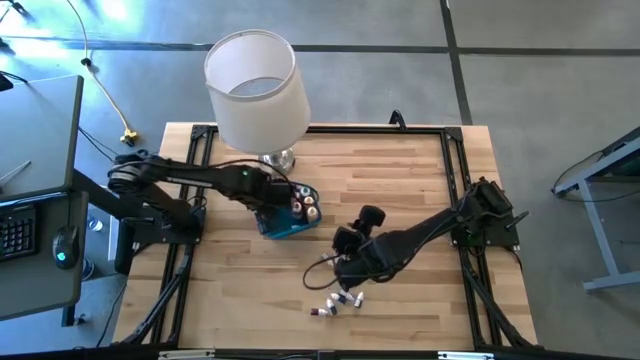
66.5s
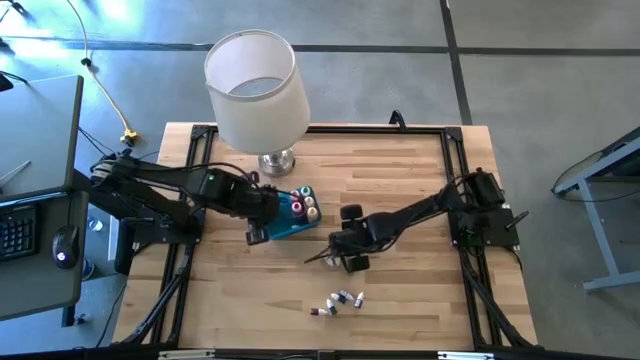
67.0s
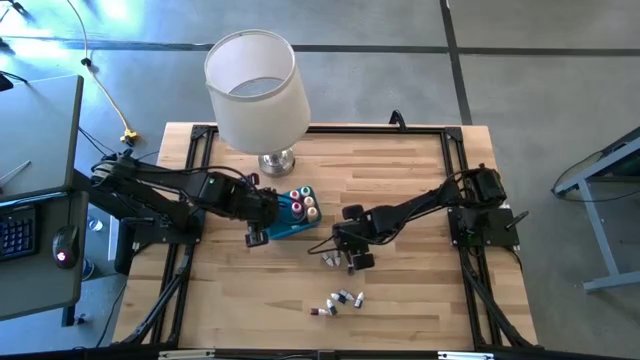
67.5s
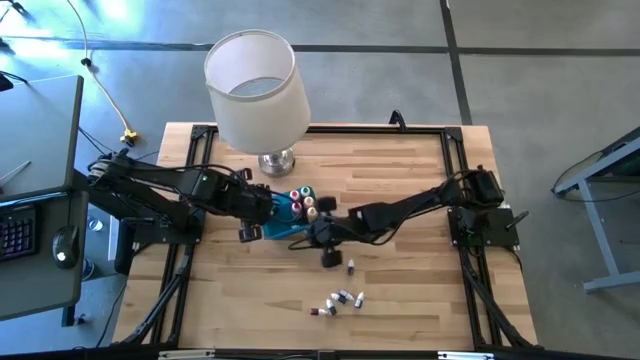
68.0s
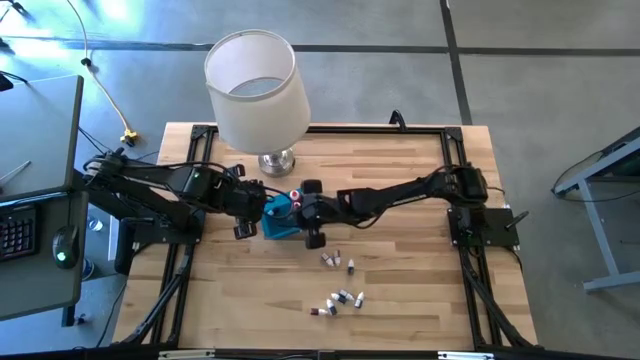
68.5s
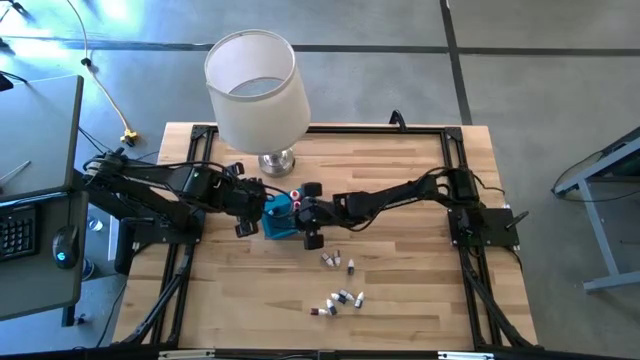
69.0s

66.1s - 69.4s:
Task: Pick & Place food coloring
Put the small green food coloring bottle into the blue bin

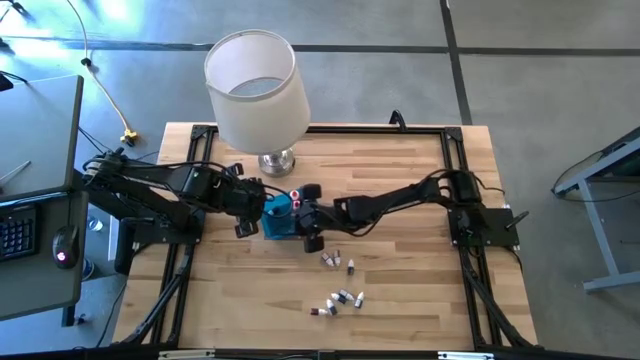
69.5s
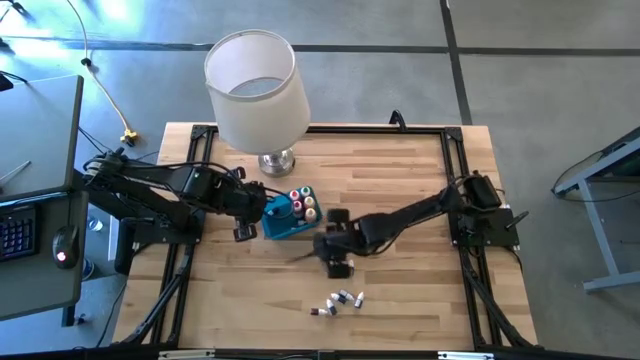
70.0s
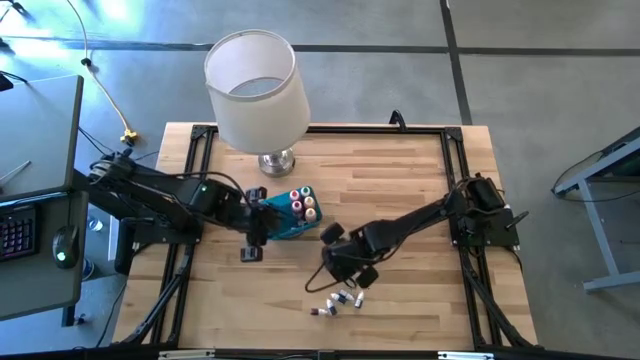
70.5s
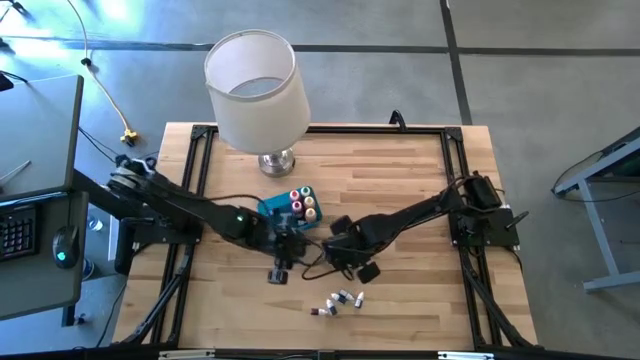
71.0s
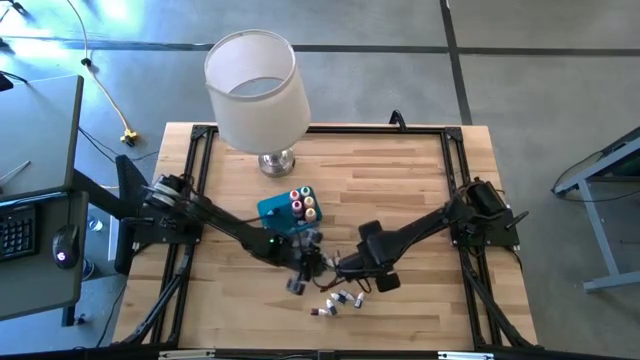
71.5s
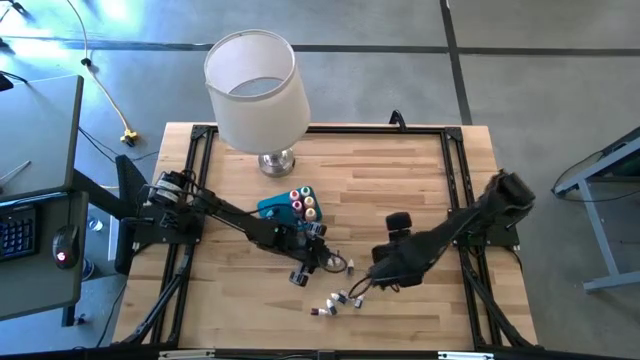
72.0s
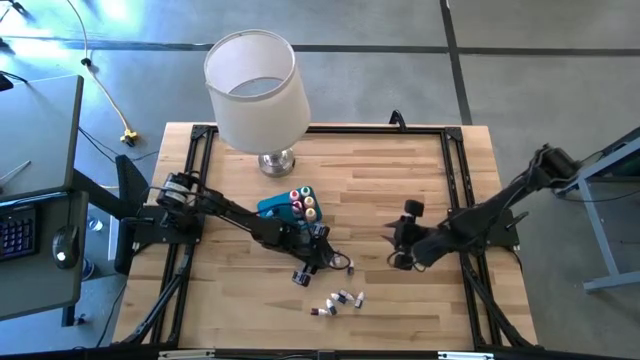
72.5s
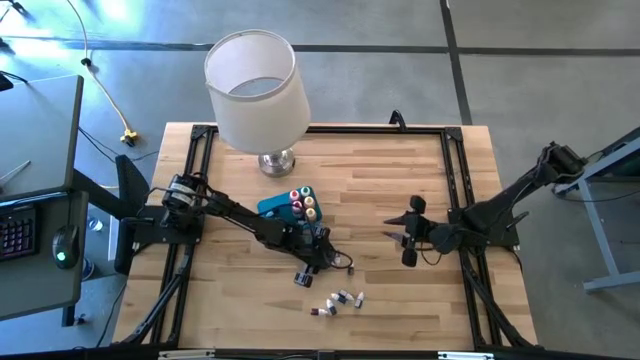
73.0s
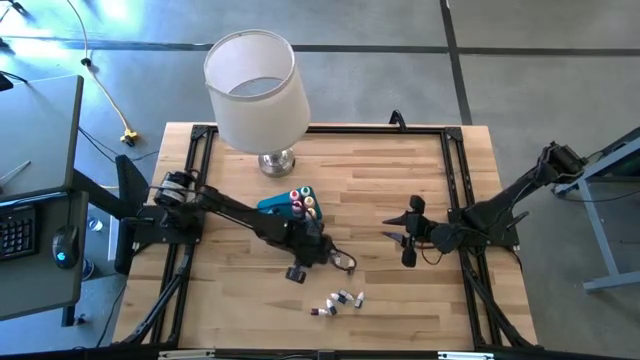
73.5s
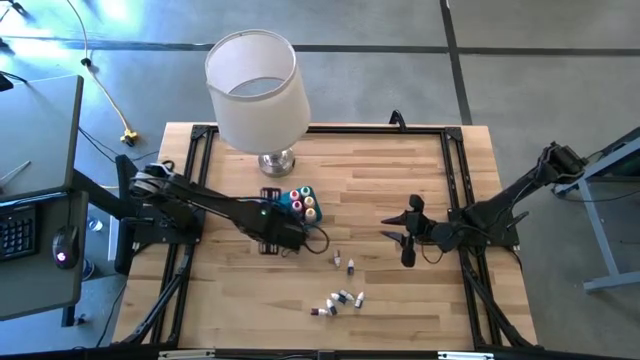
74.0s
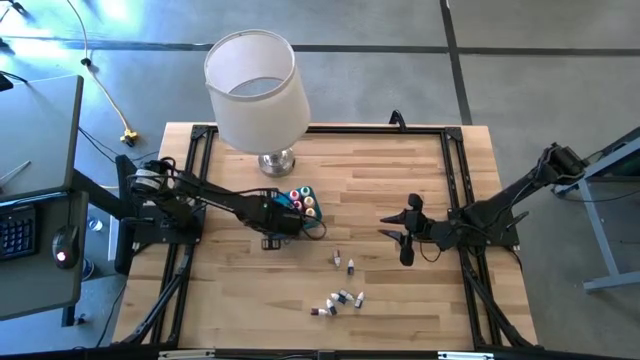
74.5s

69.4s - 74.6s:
Put the left small red food coloring bottle into the blue bin

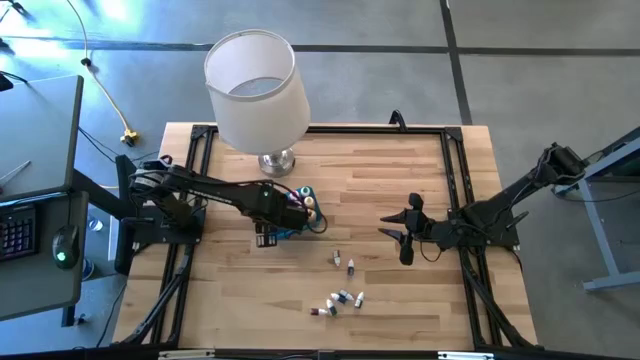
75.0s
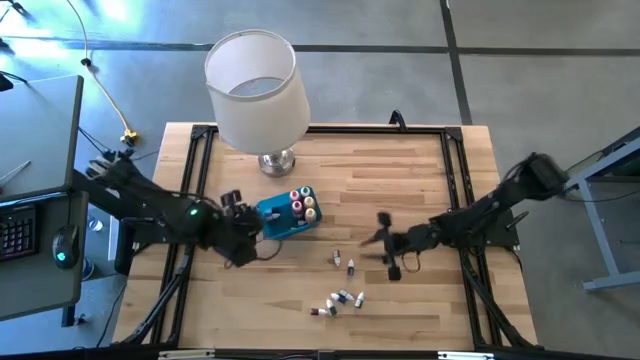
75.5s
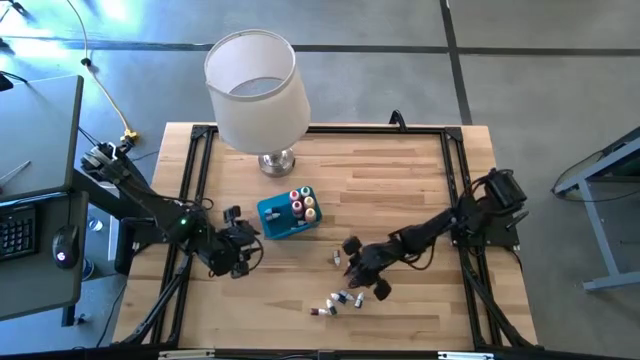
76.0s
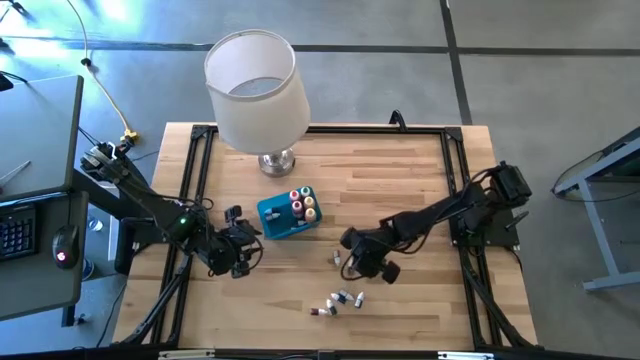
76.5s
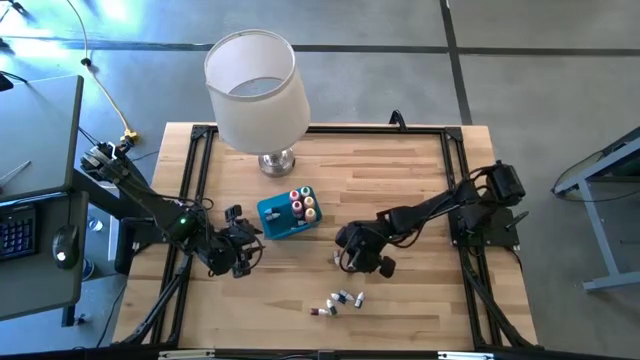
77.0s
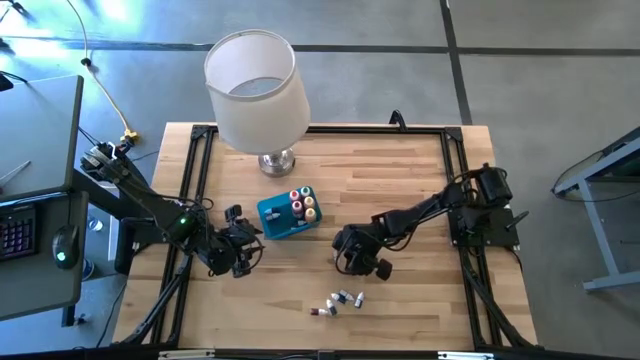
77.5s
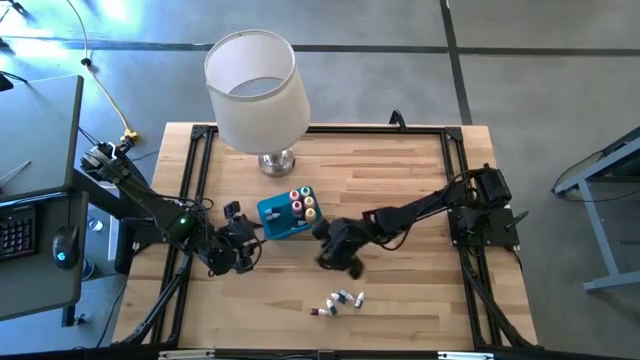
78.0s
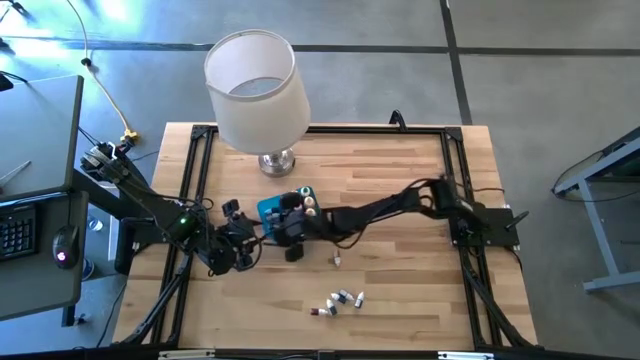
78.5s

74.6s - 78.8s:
Put the small blue food coloring bottle into the blue bin

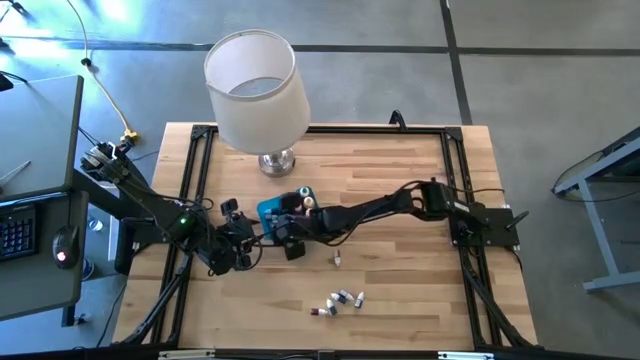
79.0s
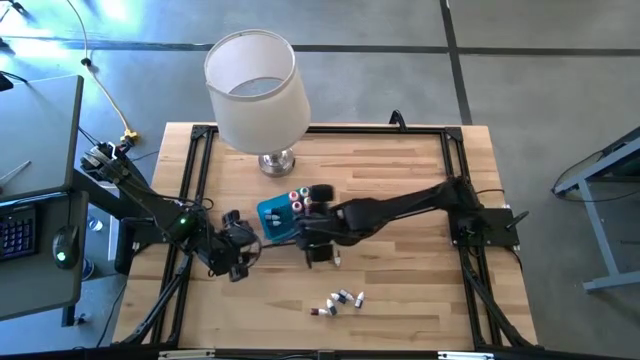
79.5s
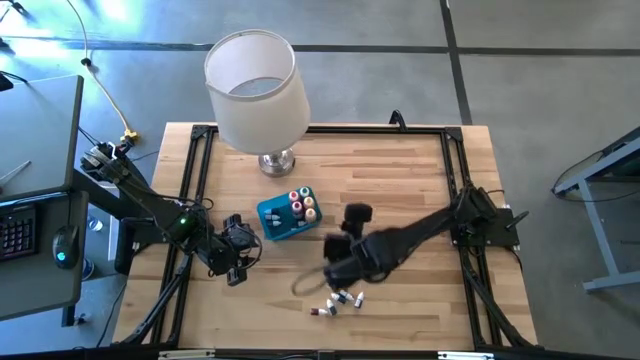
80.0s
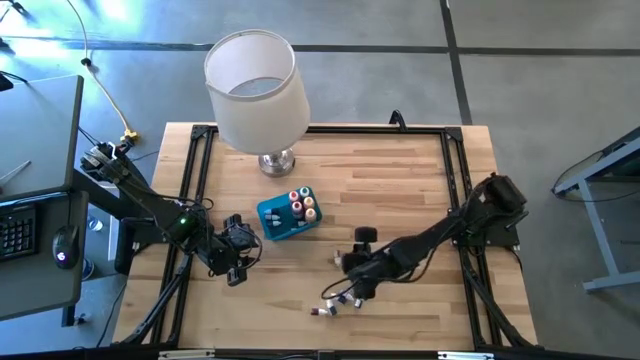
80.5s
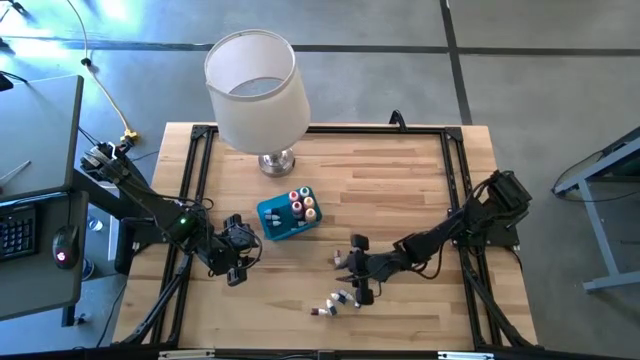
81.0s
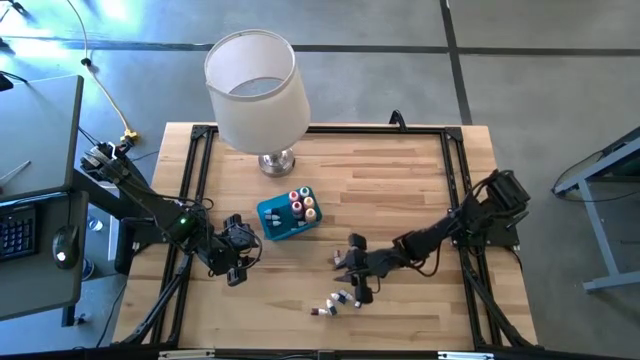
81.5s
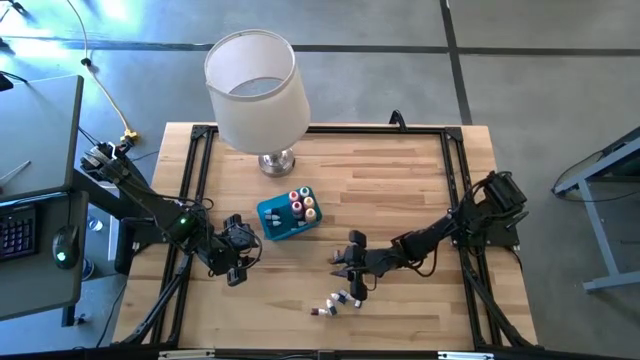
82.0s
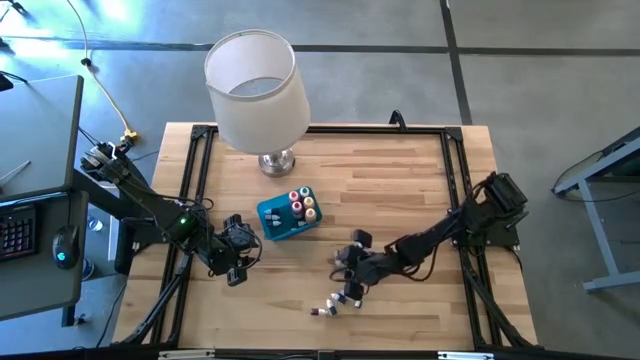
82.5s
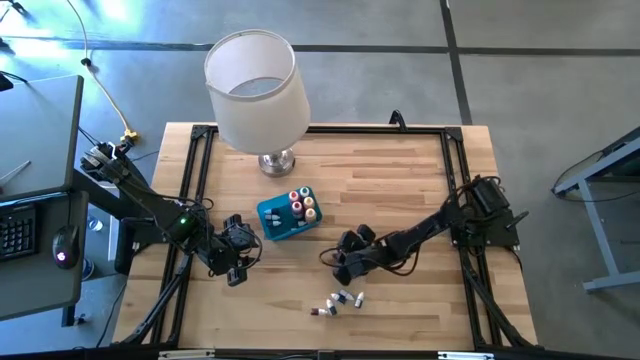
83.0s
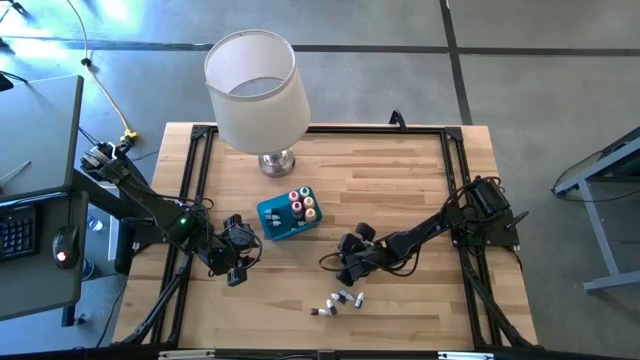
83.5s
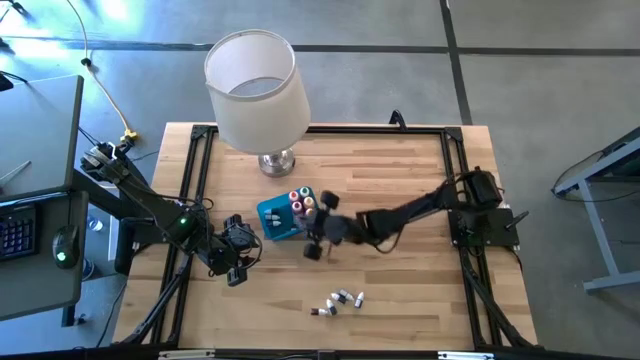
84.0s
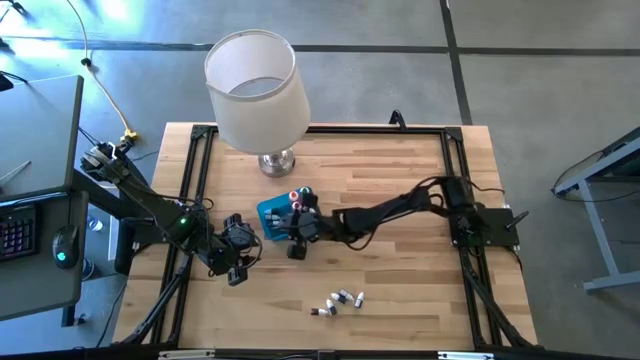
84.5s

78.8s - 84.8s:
Put the small red food coloring bottle into the blue bin

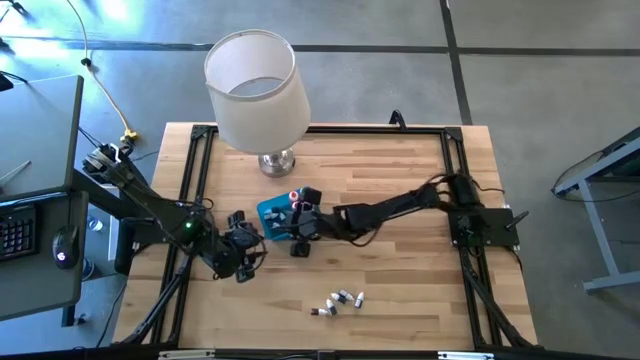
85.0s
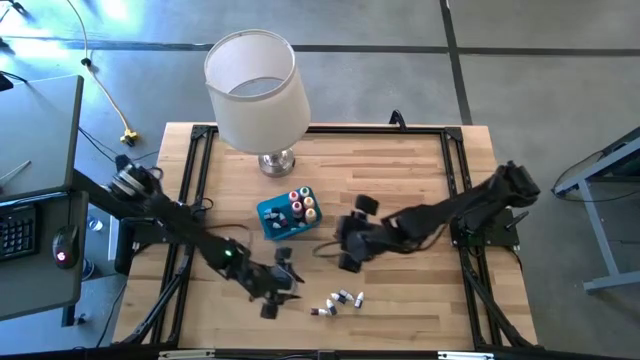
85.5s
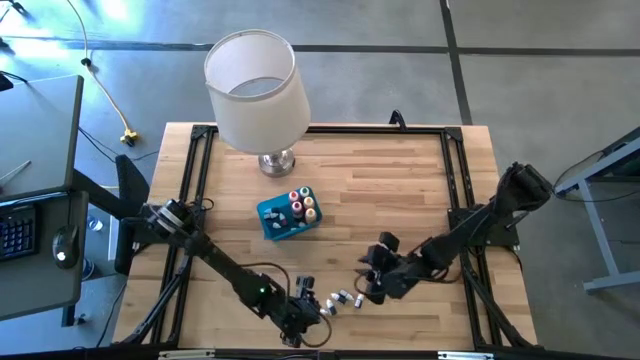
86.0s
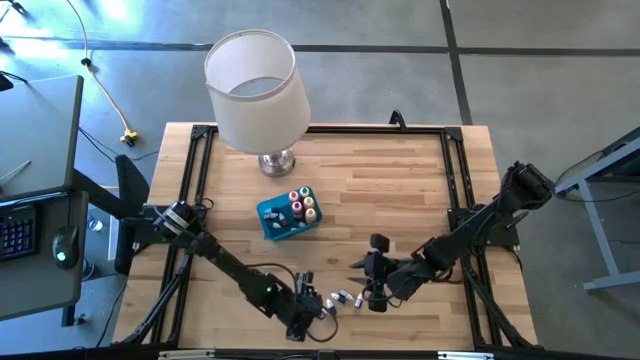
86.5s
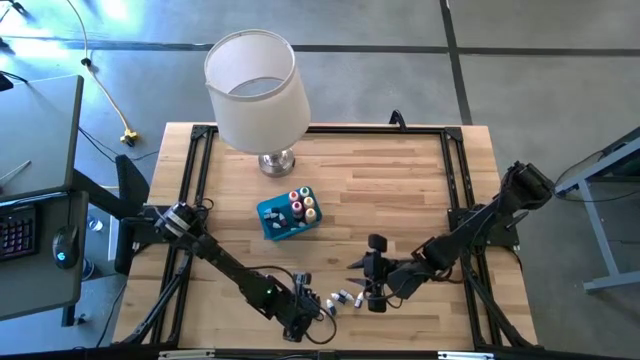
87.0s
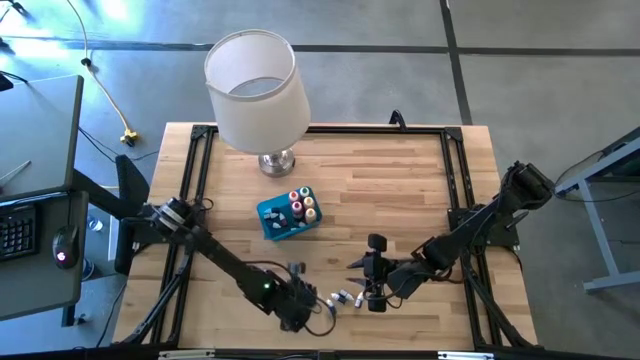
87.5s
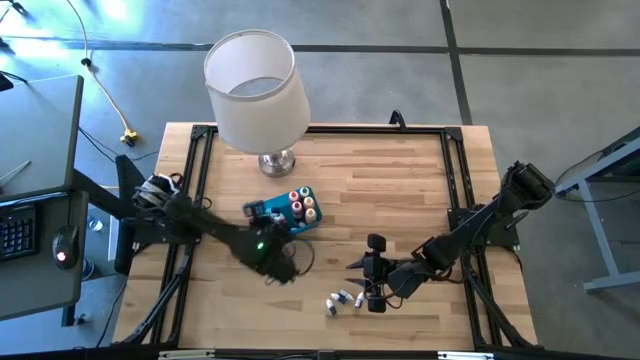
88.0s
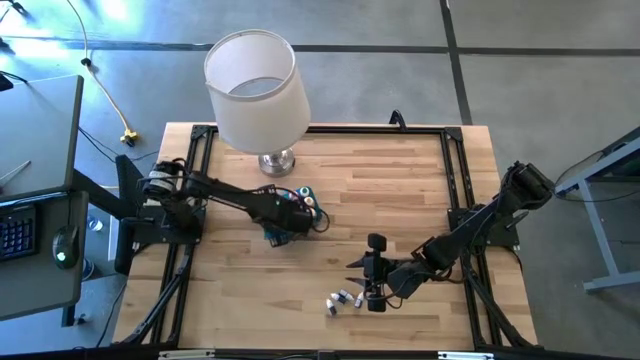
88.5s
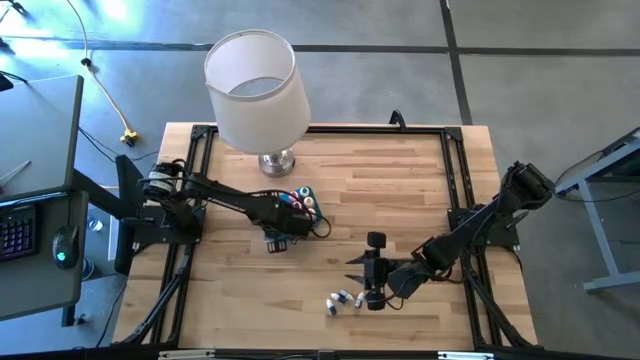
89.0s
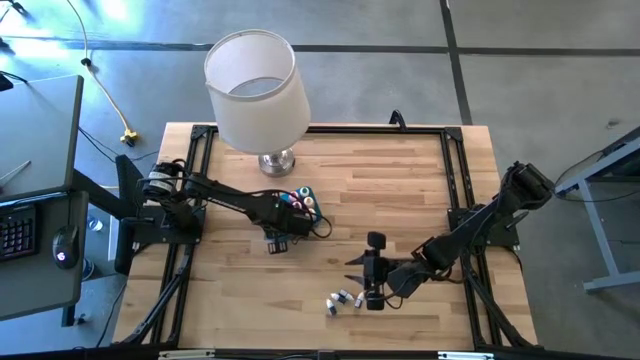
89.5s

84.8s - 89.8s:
Put the small orange food coloring bottle into the blue bin
